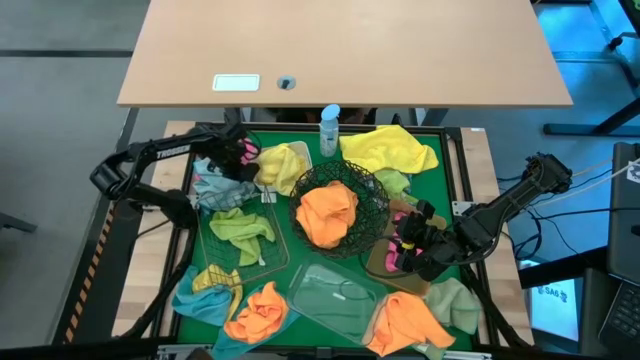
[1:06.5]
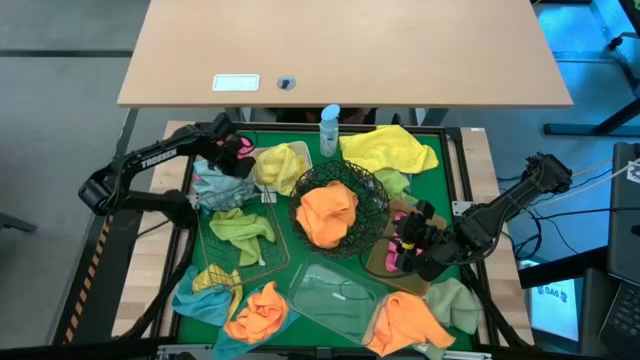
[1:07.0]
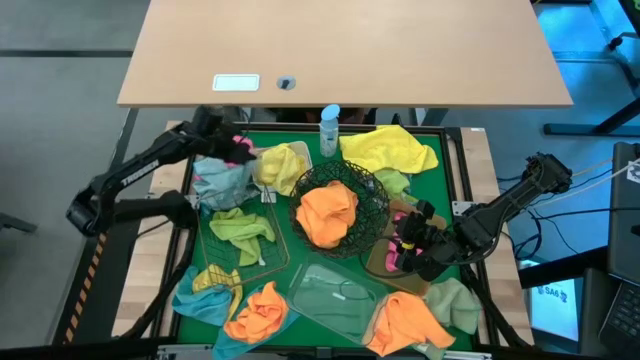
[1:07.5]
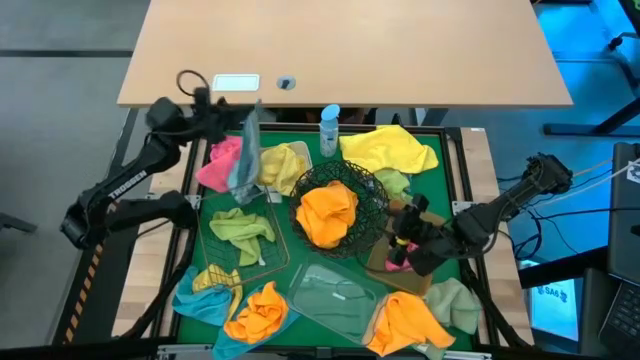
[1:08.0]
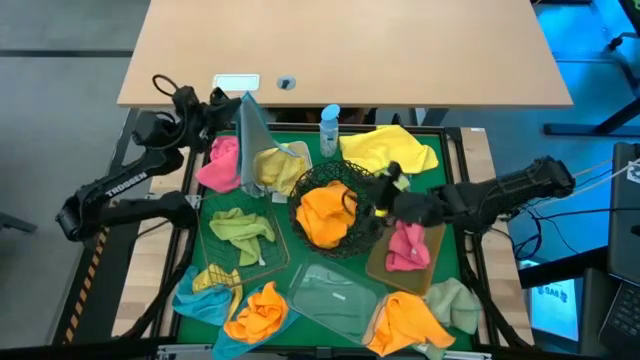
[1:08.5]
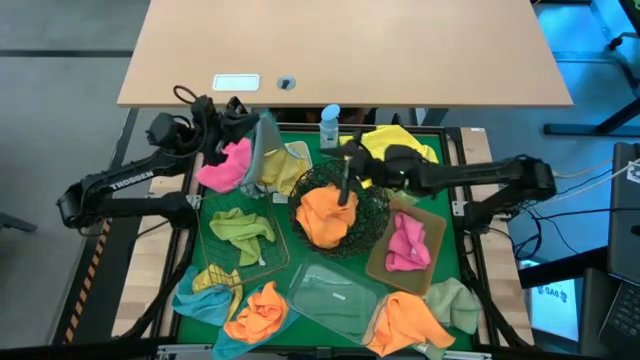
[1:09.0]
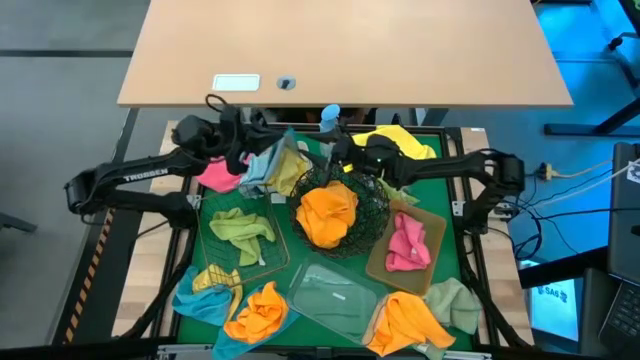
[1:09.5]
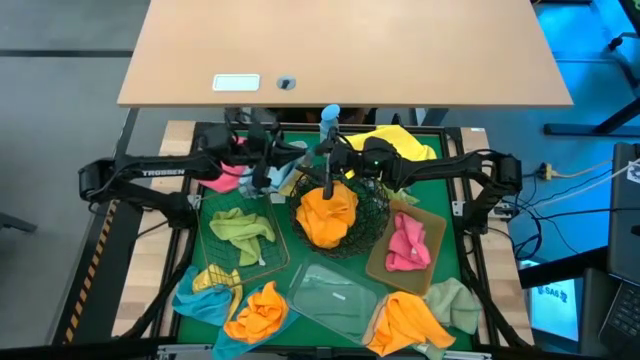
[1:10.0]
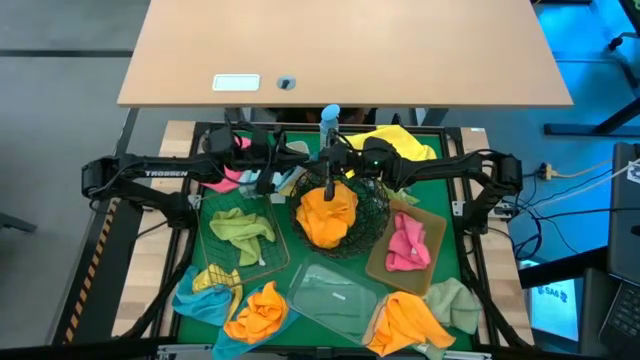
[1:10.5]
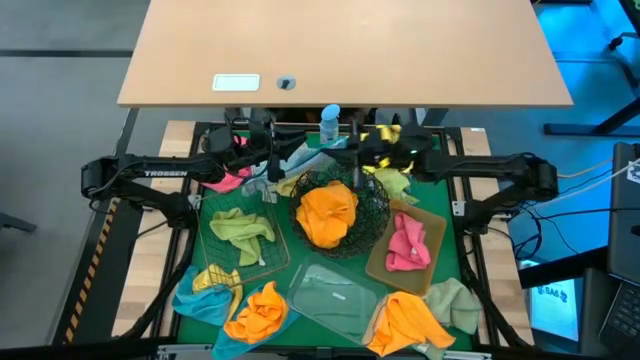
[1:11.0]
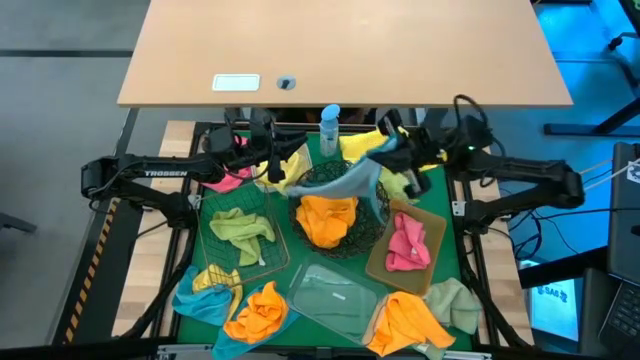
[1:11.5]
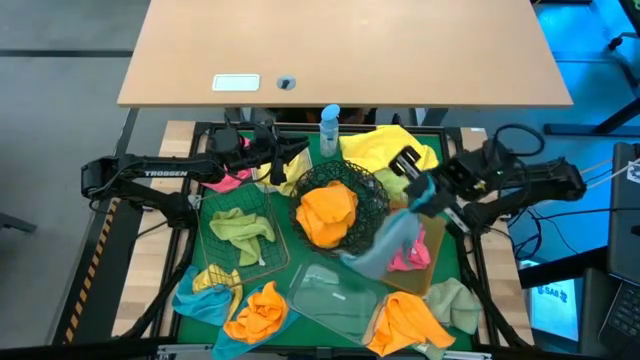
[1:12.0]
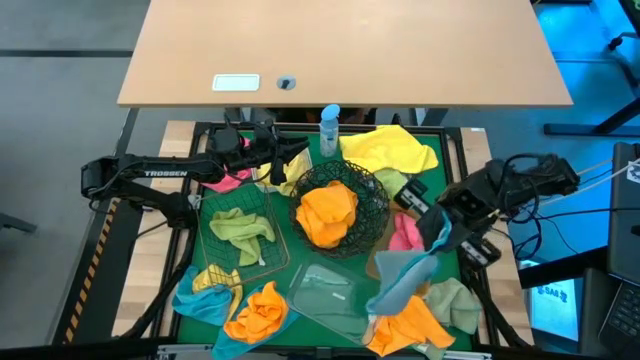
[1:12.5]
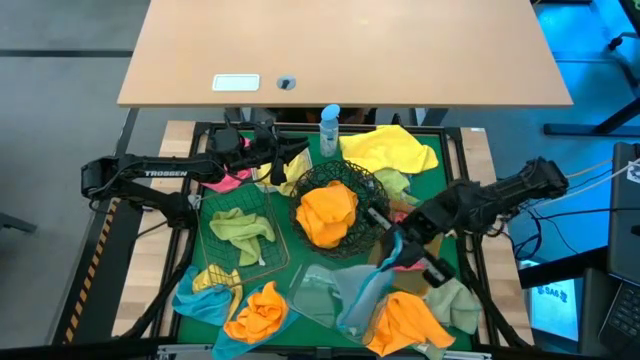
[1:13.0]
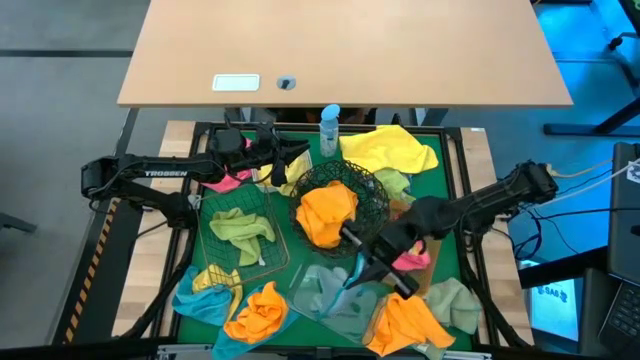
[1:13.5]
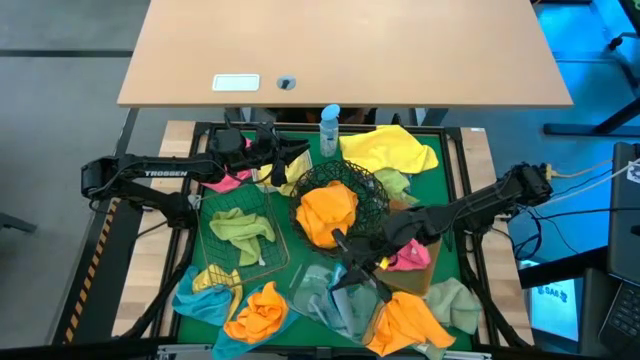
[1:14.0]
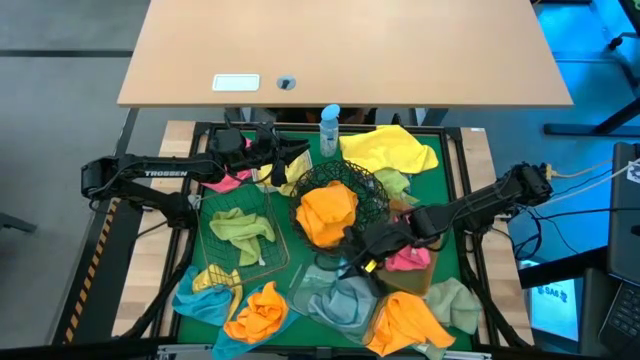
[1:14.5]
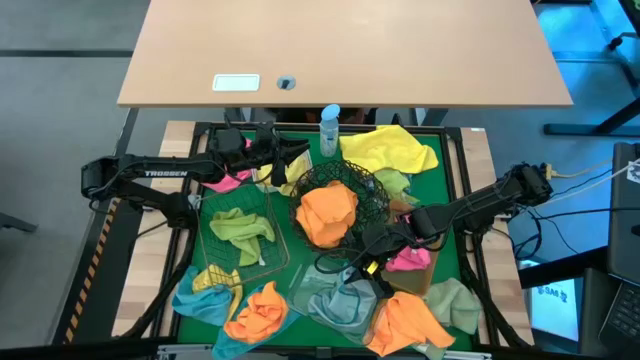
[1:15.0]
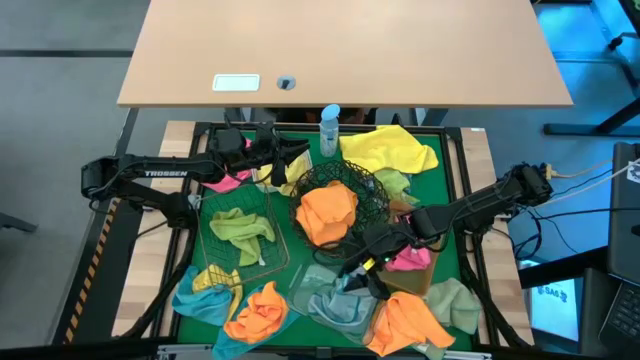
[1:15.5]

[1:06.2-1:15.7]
Task: Sort microfiber towel by color & place in baskets
Put the top light blue towel into the transparent bin

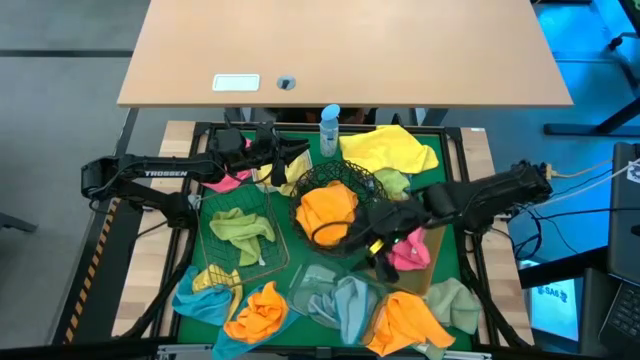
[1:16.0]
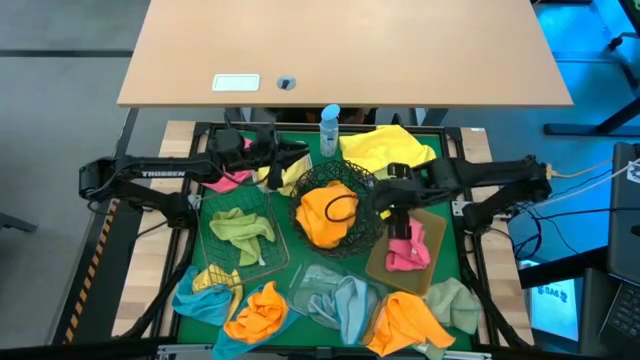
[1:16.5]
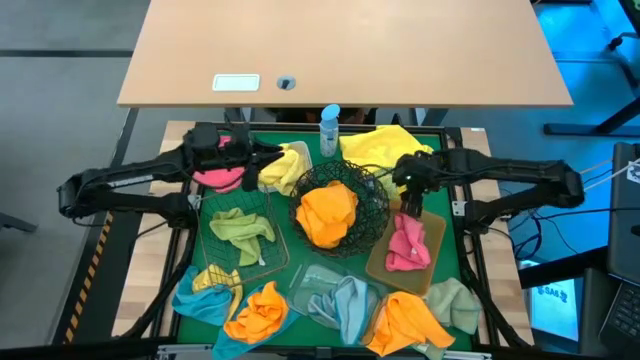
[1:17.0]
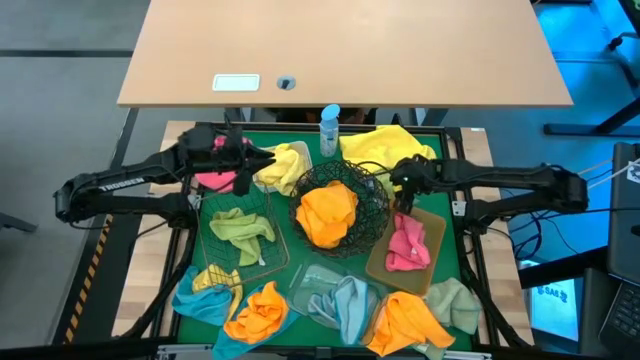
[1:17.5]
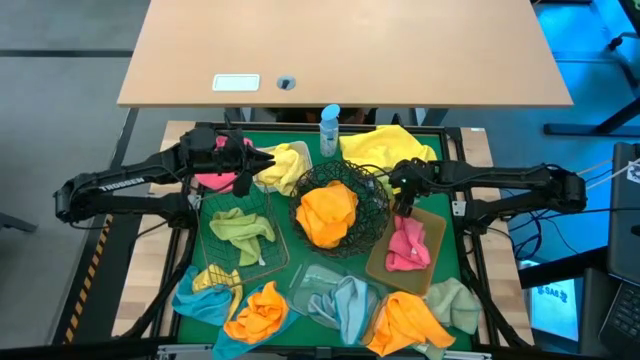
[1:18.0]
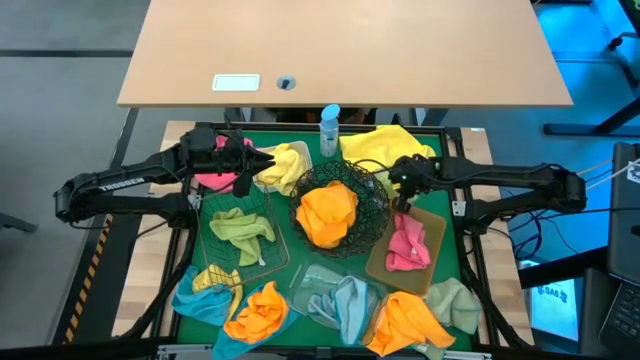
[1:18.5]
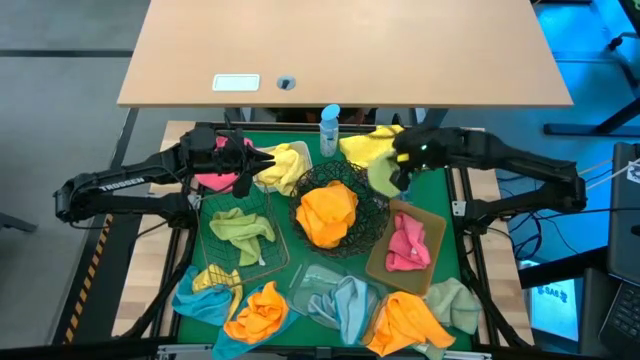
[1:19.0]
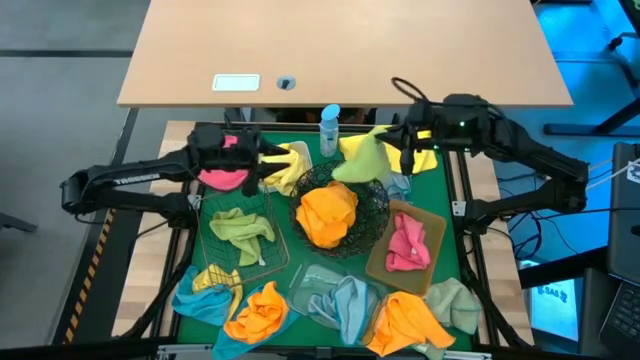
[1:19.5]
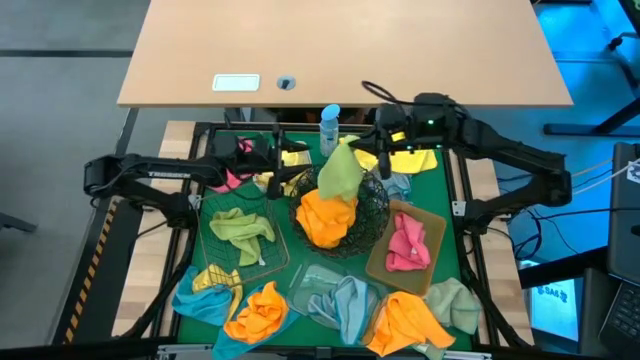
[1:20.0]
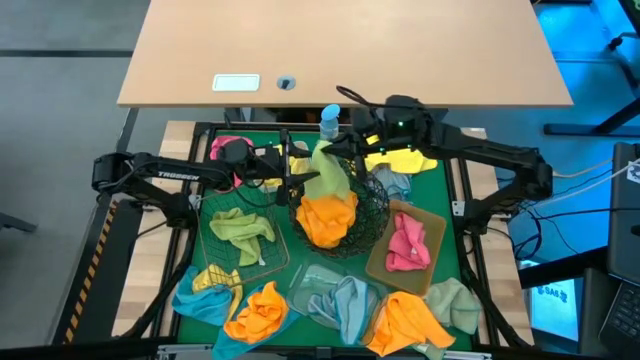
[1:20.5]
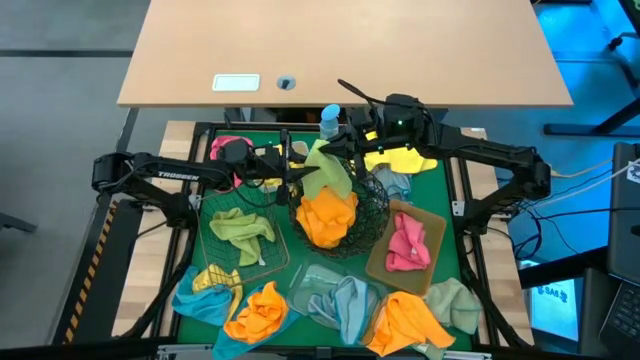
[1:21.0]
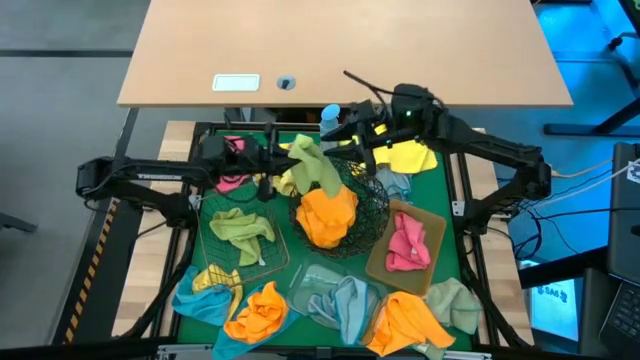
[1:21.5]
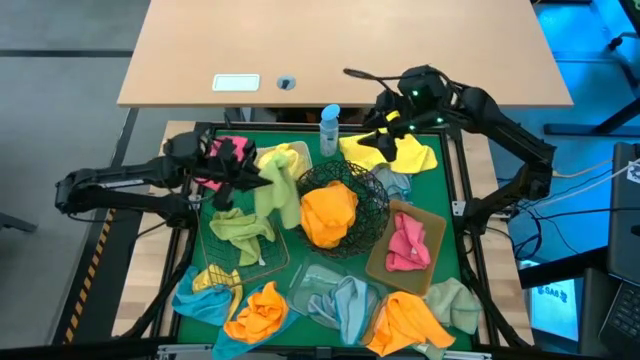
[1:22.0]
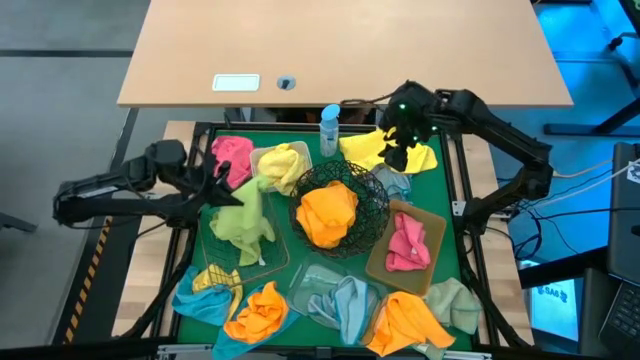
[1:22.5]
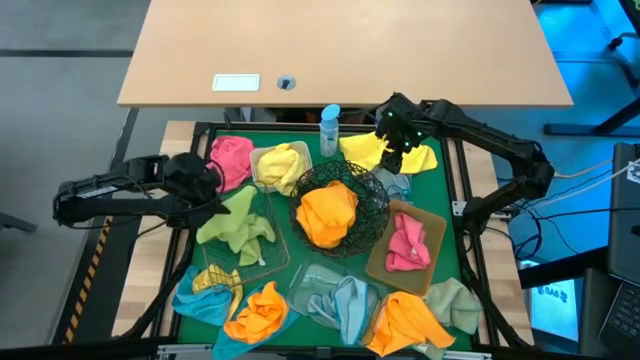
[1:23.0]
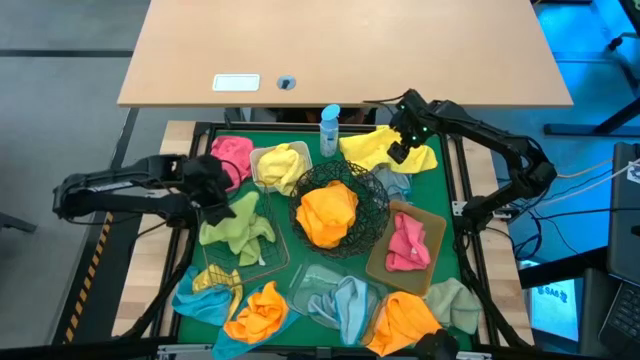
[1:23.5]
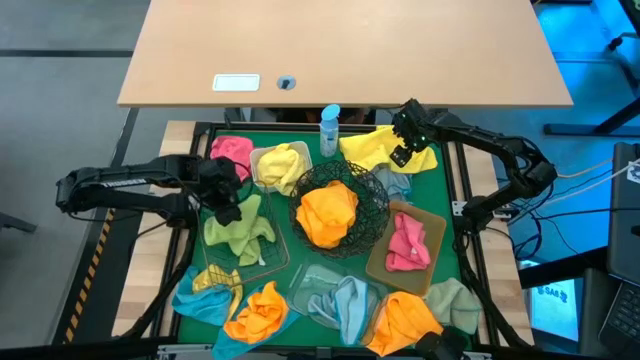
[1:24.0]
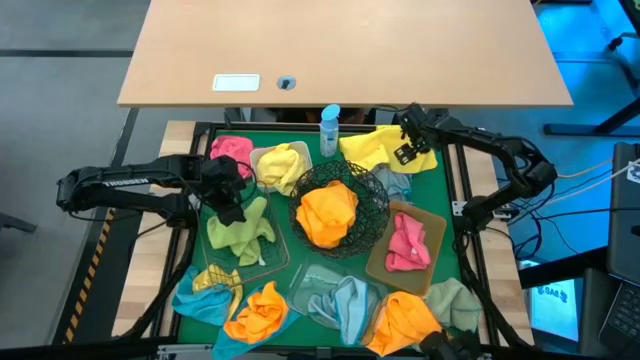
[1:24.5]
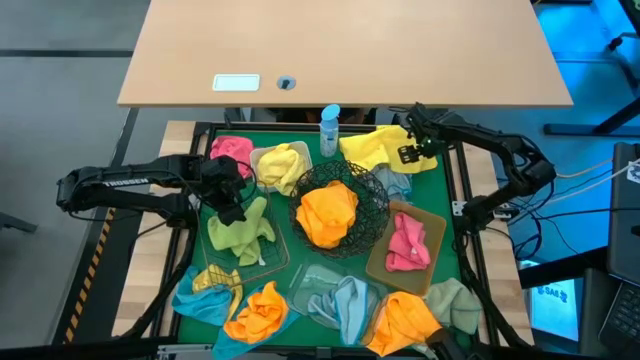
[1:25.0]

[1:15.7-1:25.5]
Put the green towel into the rectangular wire basket

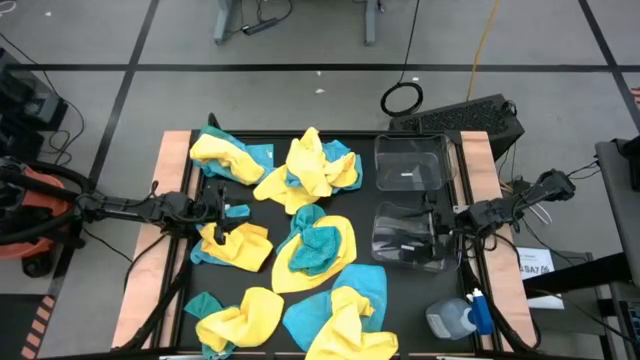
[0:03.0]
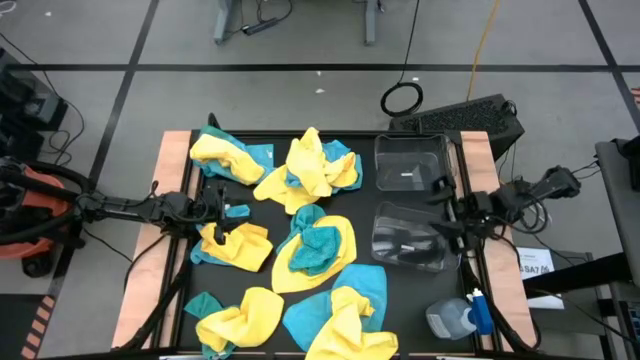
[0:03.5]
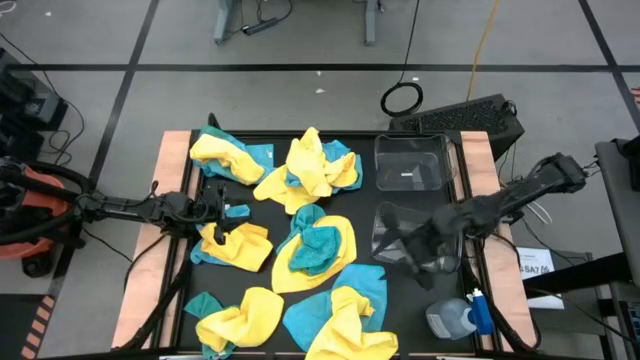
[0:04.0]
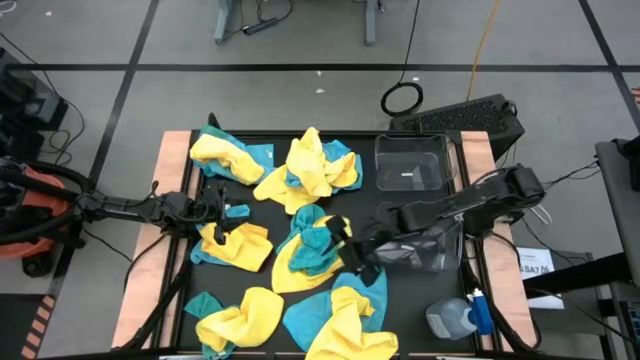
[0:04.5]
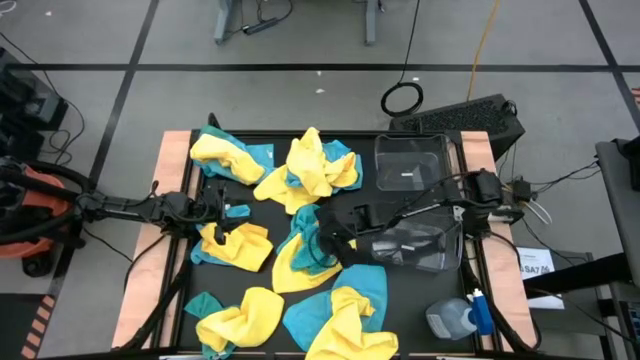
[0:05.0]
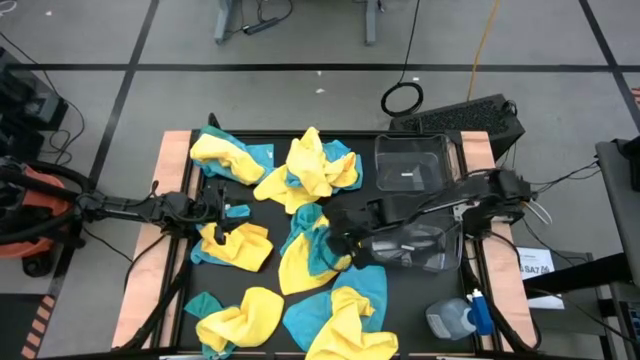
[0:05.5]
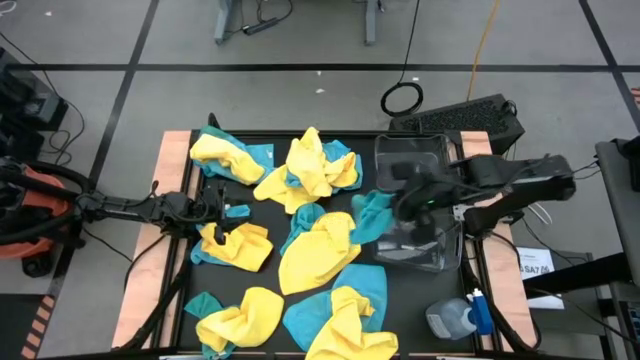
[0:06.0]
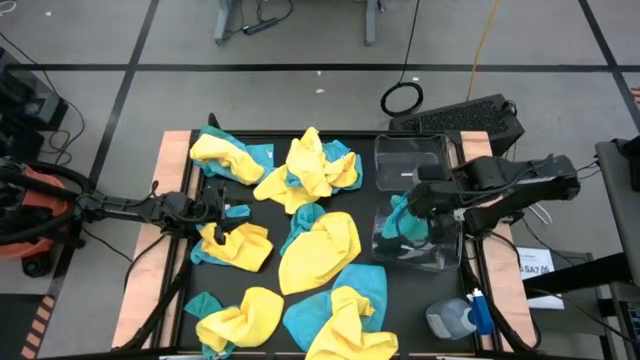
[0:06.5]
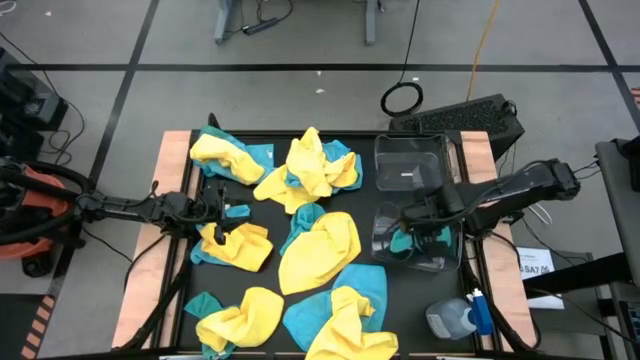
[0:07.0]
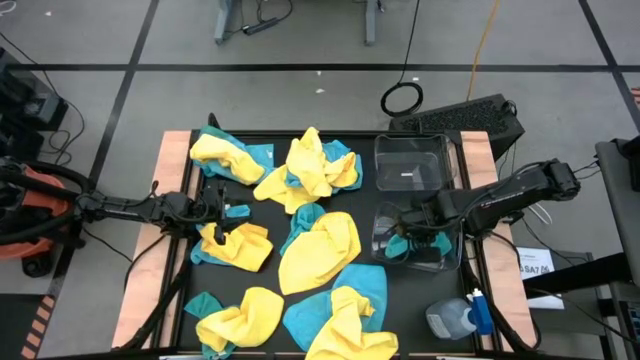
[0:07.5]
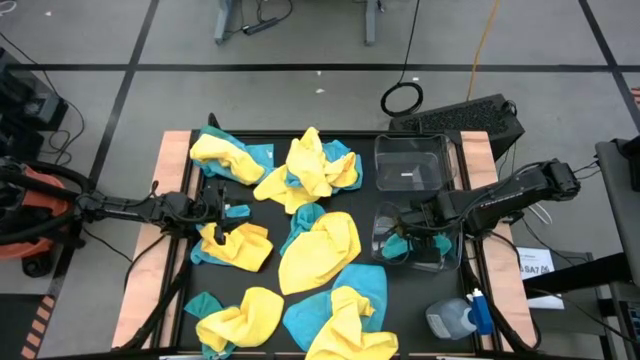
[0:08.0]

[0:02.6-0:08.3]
Task: Sort microfiber towel by color & place in baskets
Put the blue microfiber cloth into the bottom transparent bin
